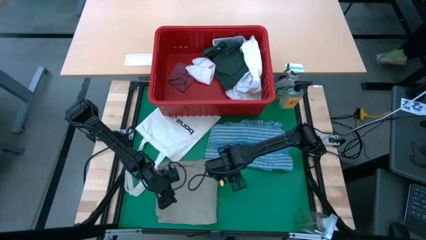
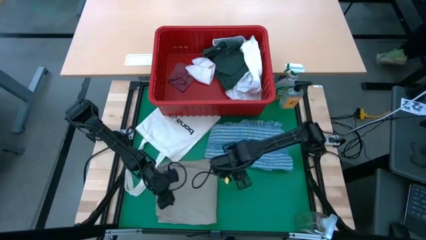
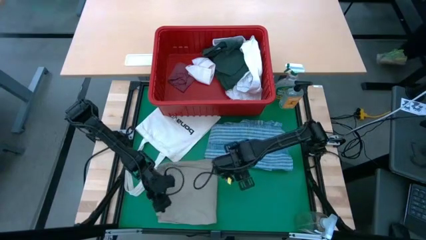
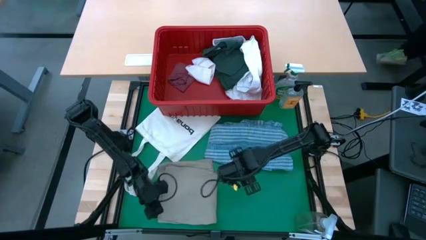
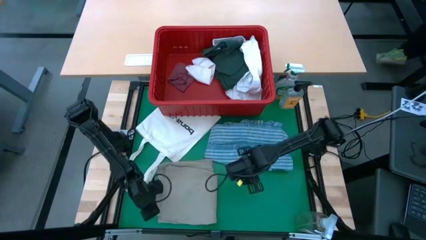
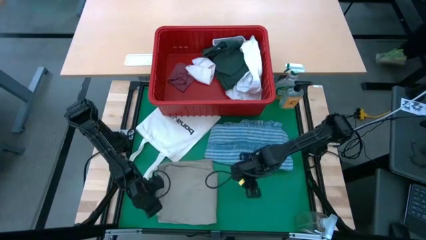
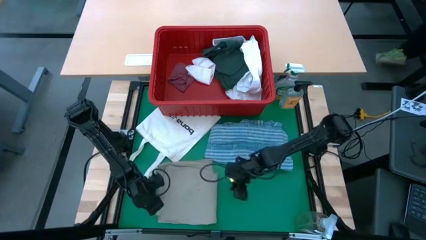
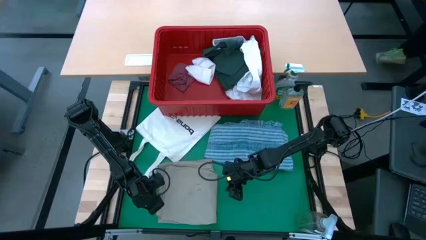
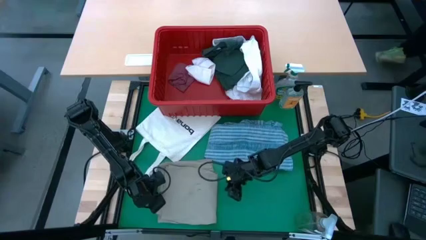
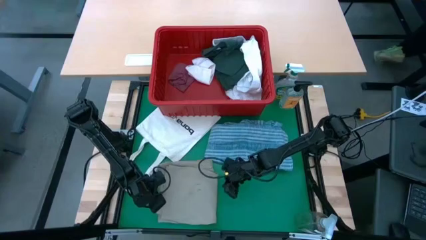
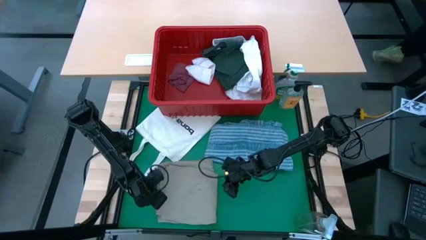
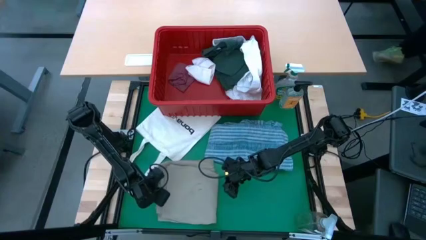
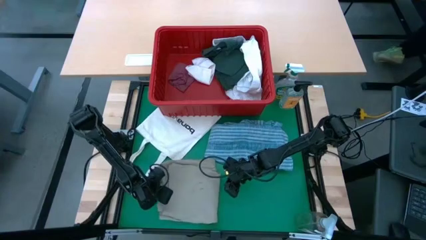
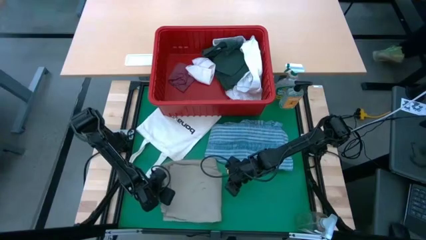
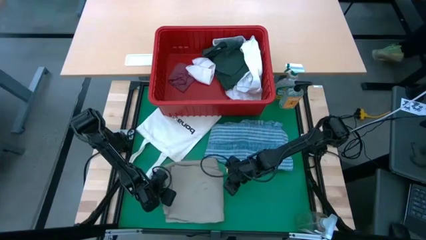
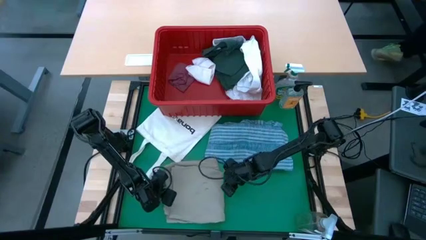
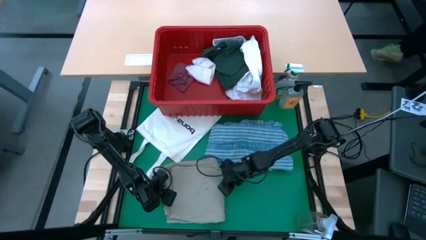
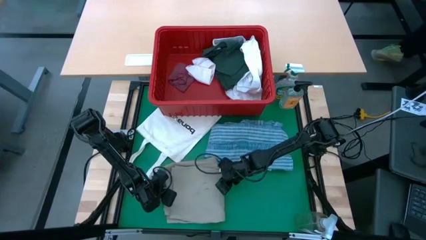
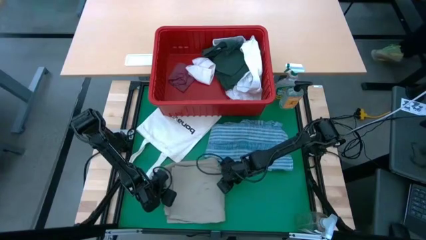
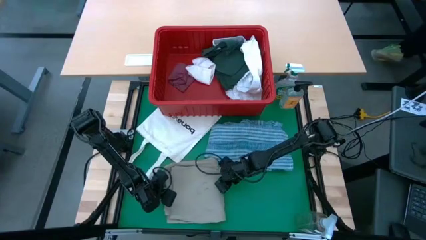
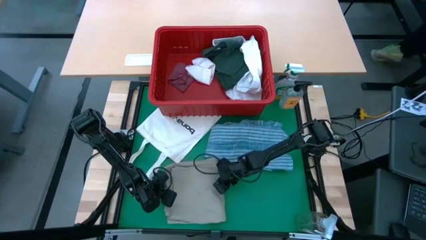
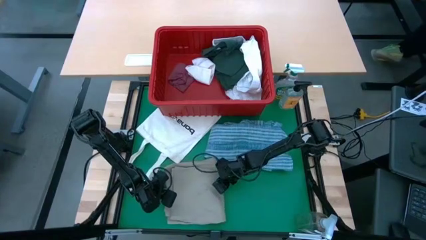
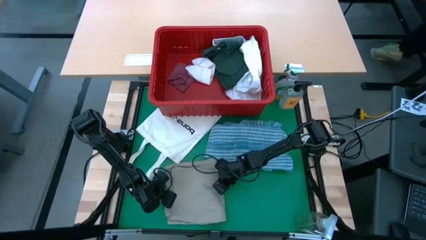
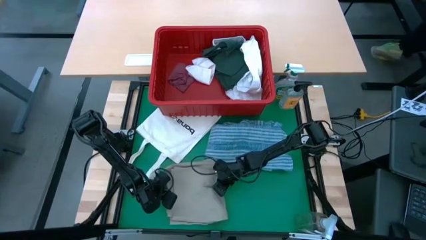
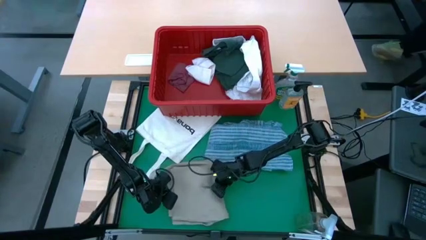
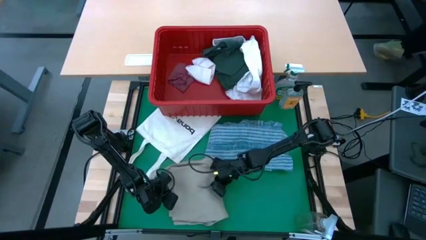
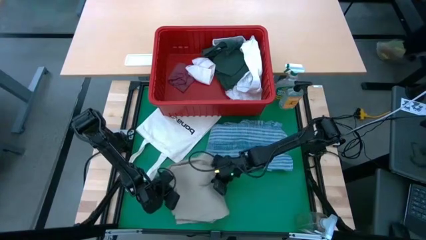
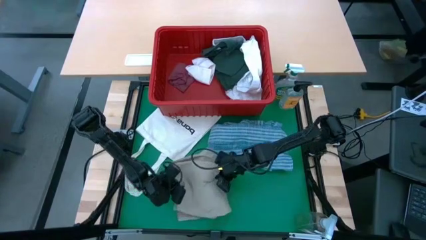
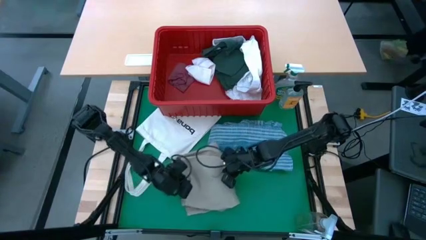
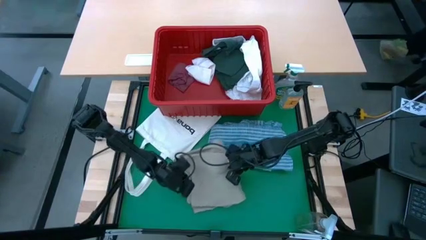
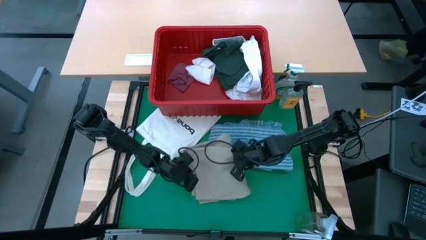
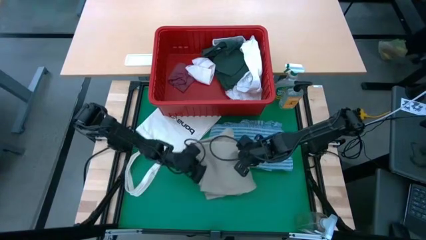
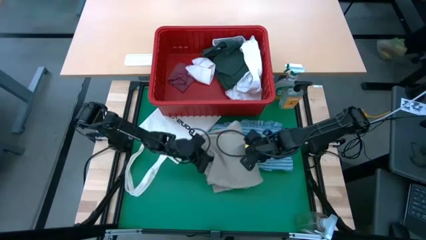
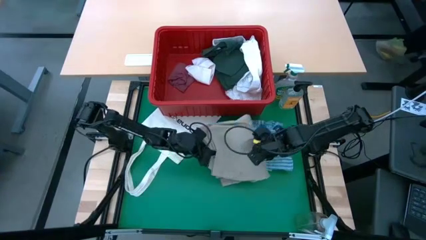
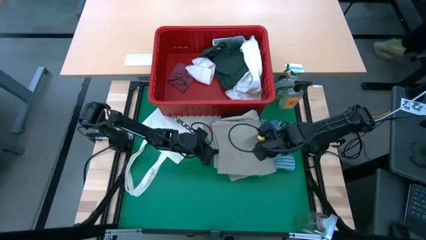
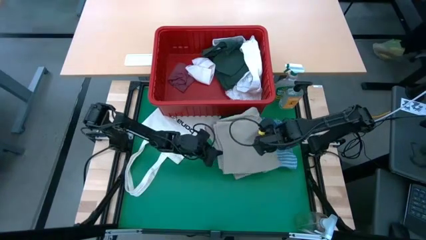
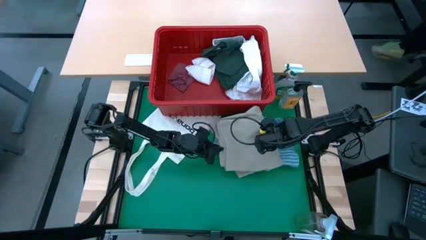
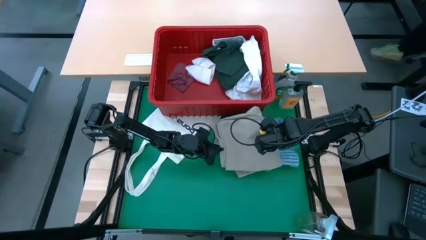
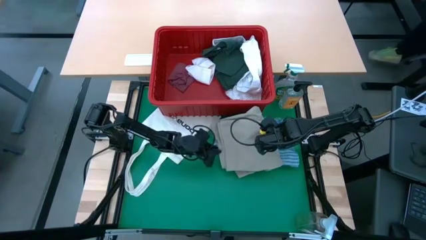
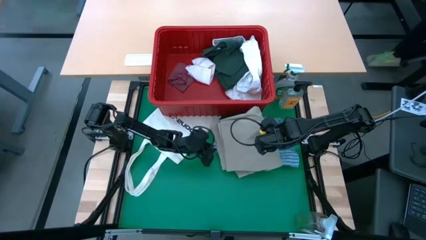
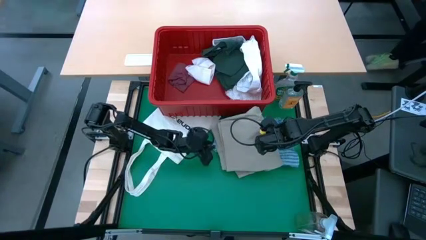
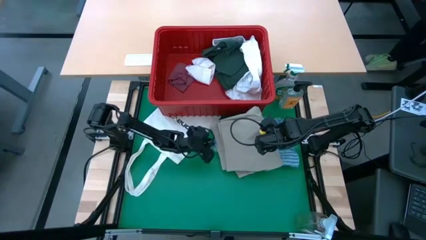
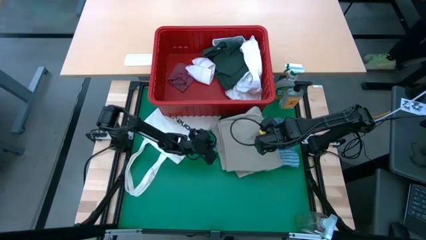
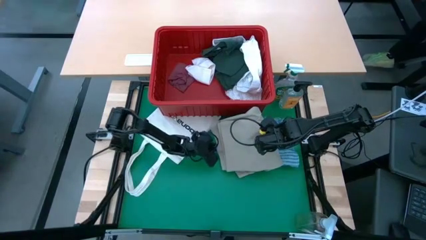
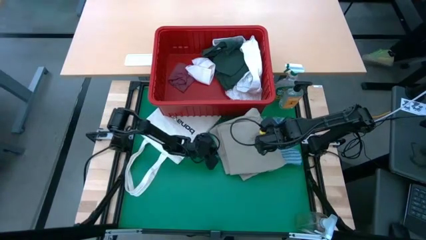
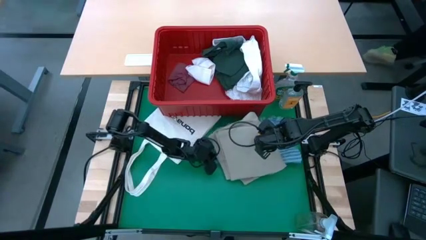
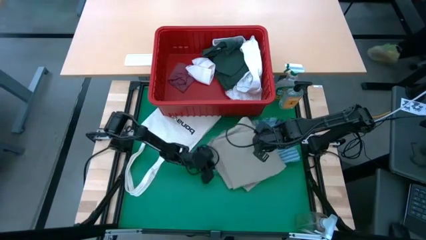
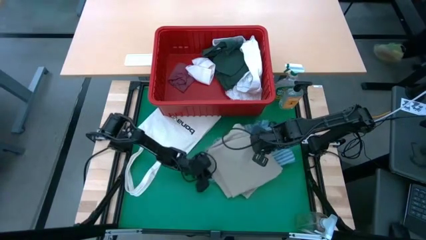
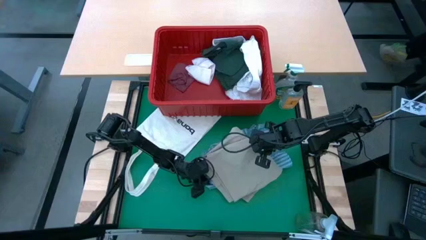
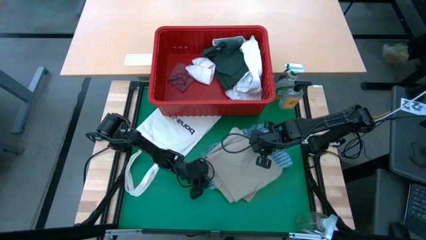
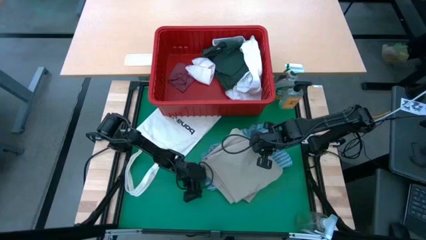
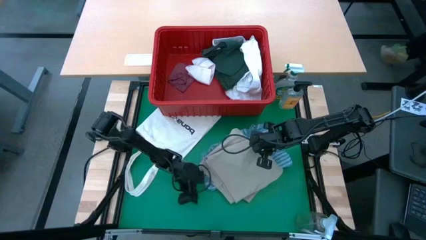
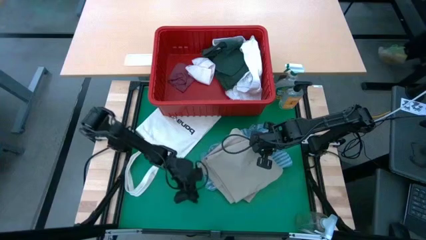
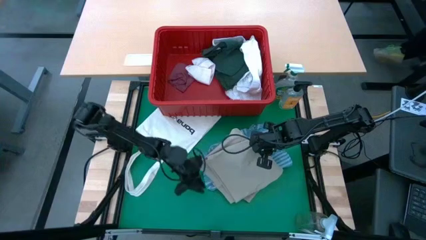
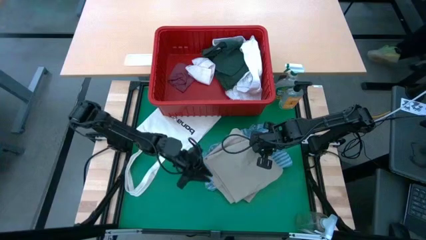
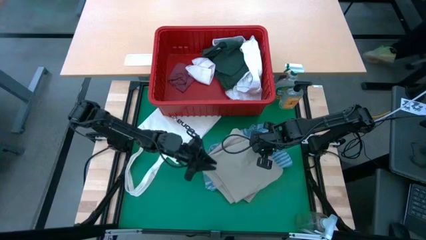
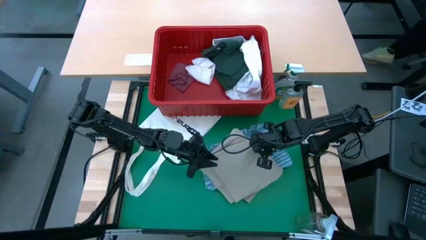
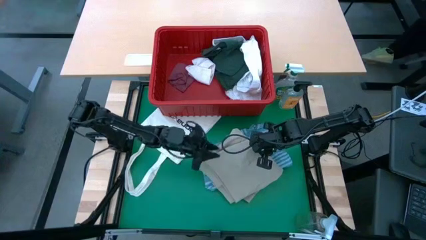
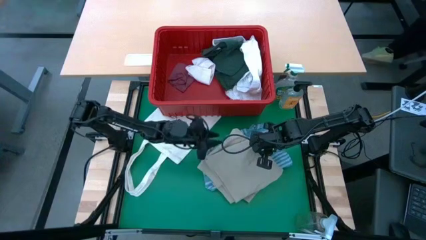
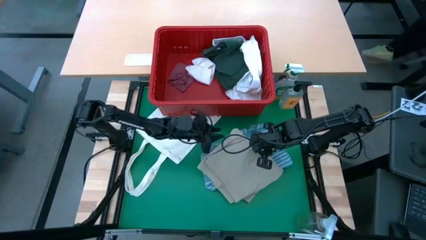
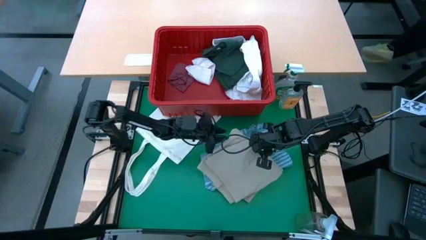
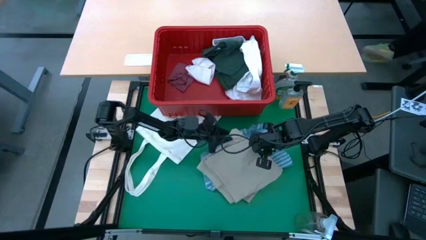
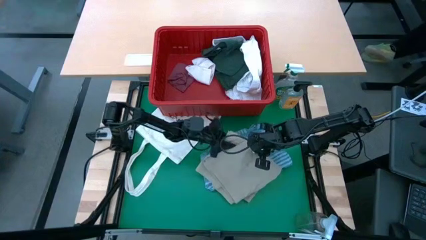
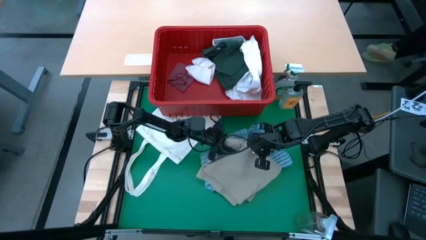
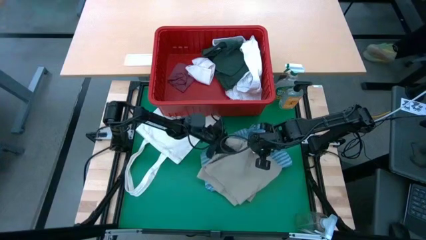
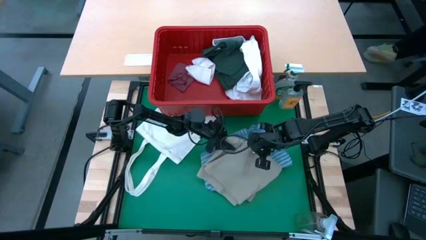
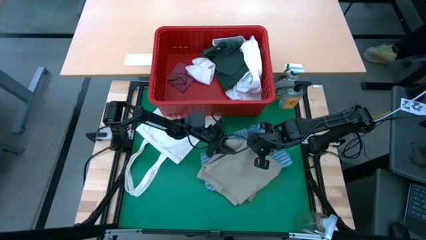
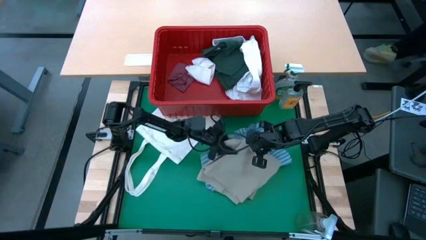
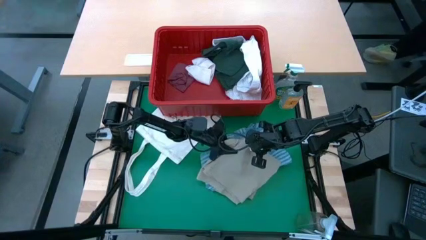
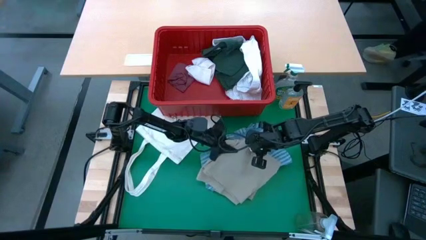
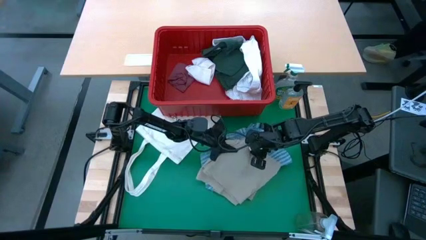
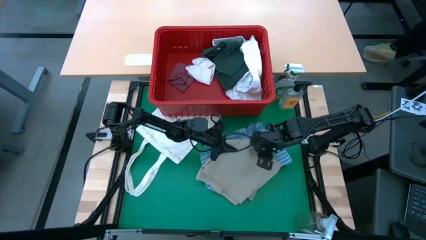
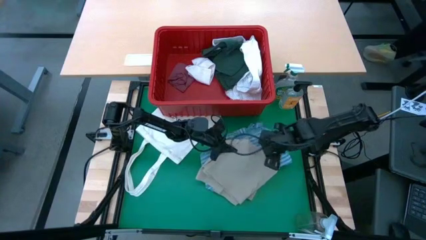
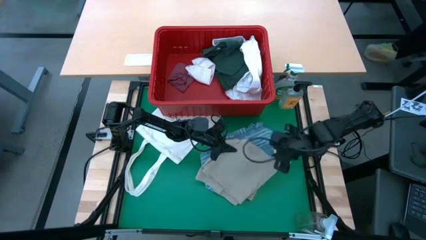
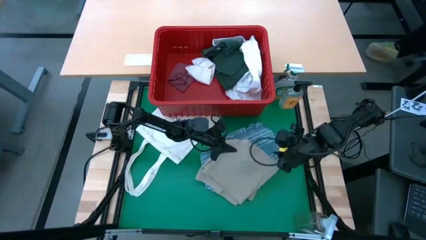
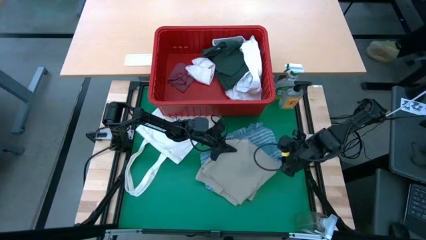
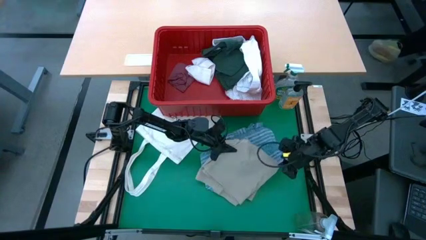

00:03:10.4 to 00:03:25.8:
Task: Fold Laundry from Bin
Stack the brown shorts on top of the blue polo shirt
